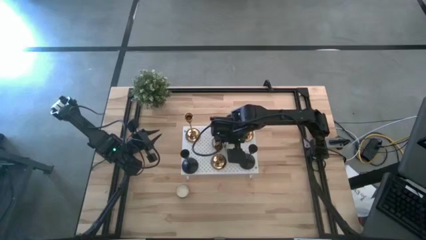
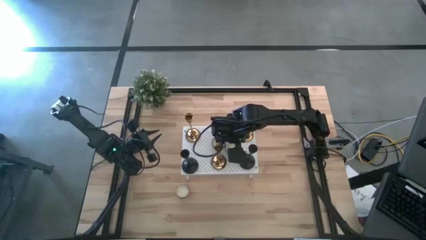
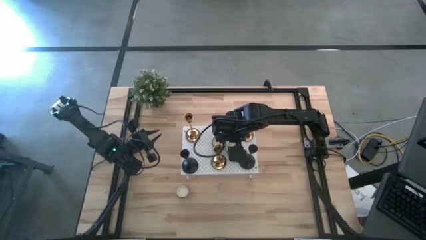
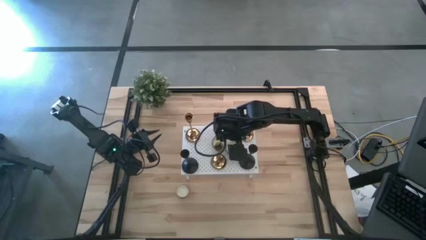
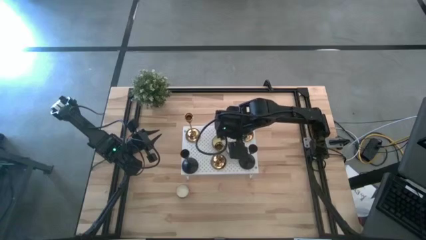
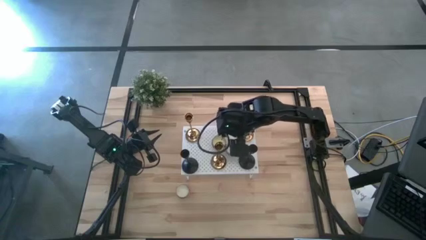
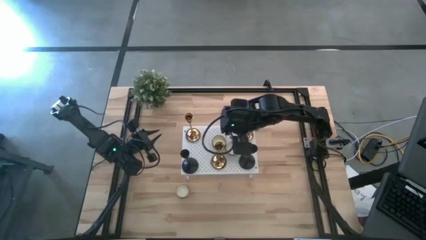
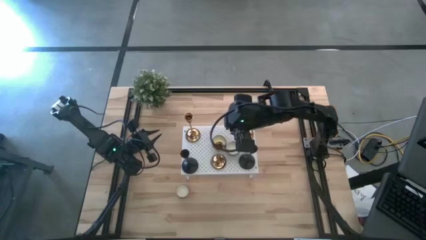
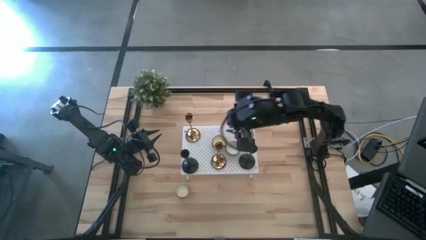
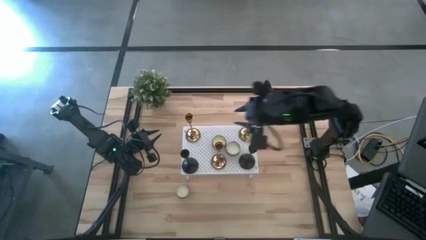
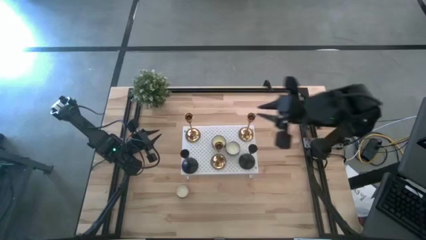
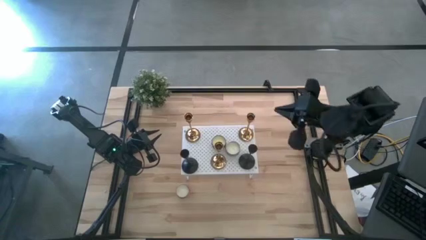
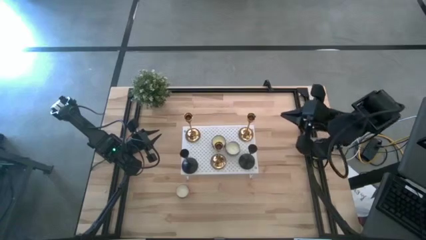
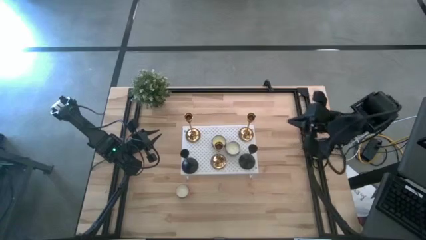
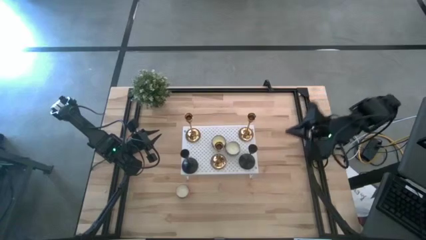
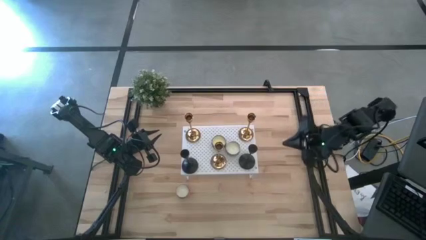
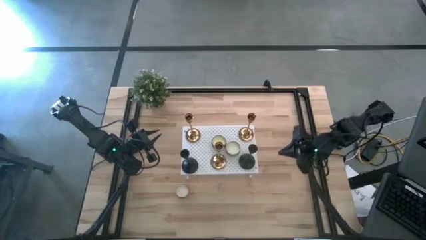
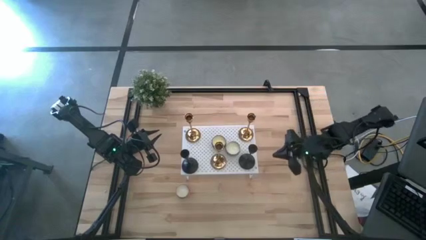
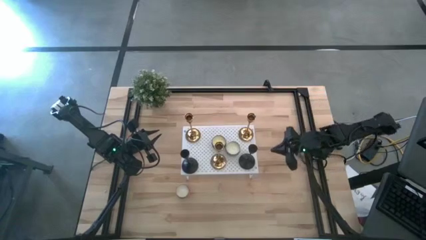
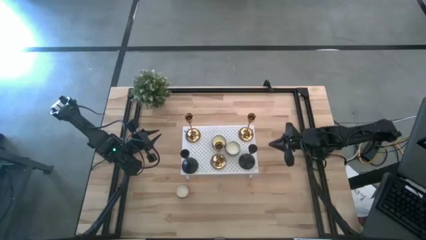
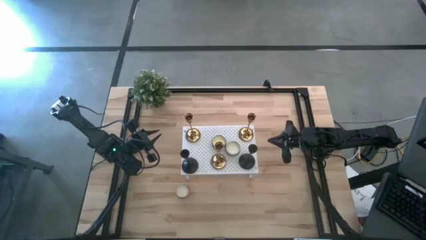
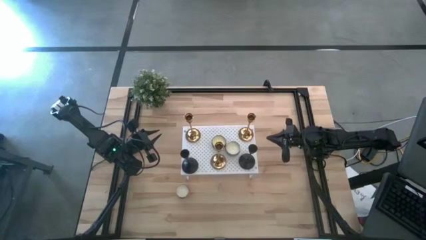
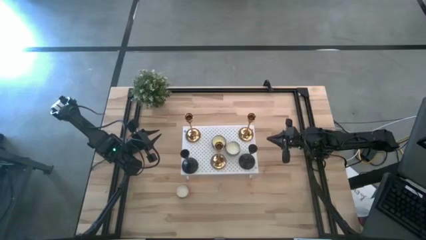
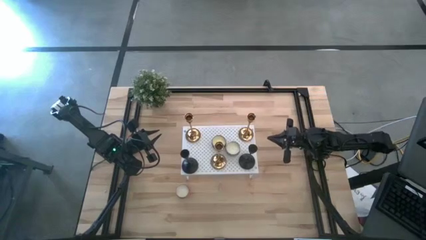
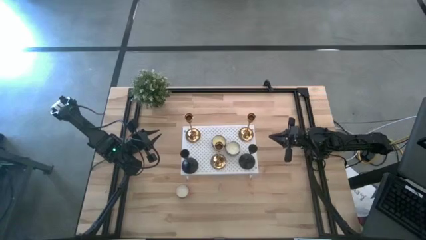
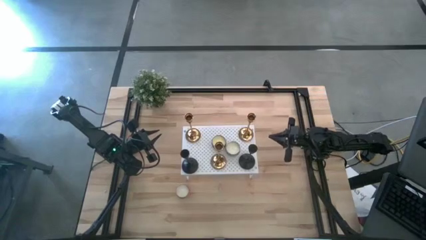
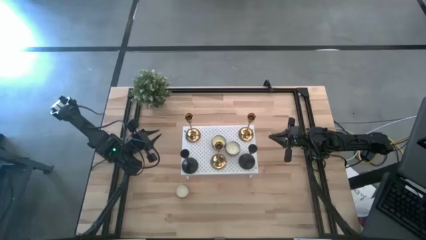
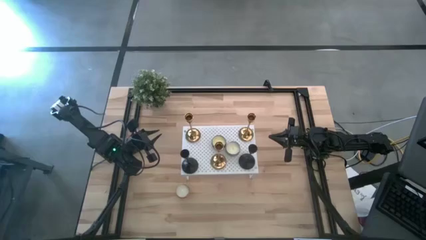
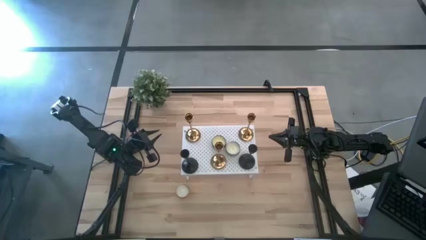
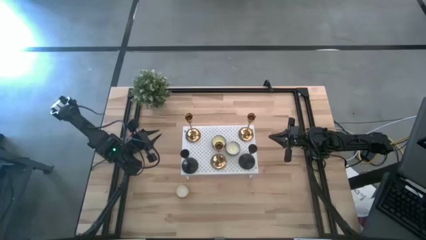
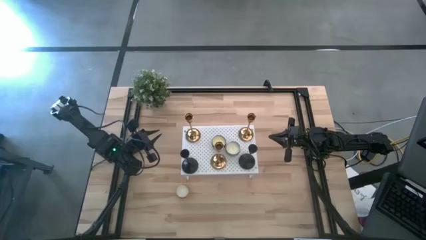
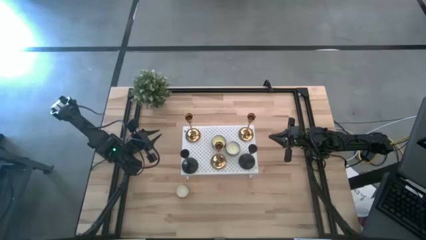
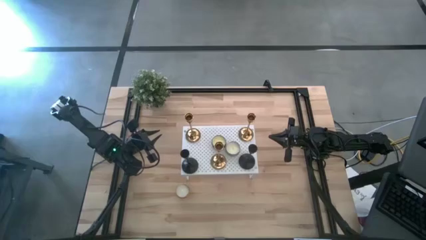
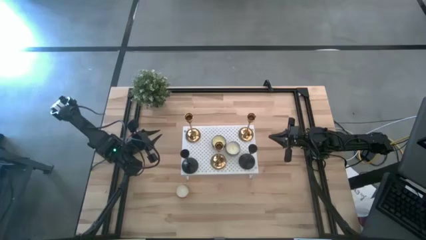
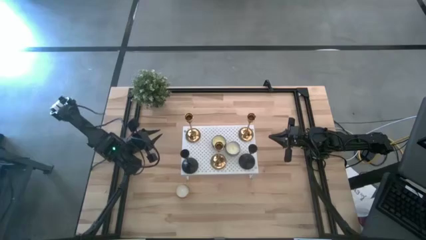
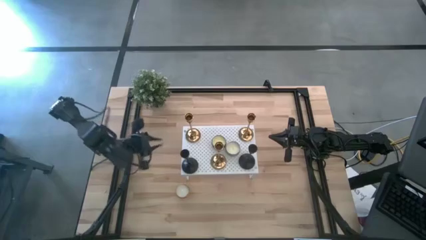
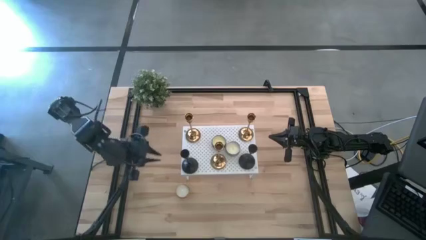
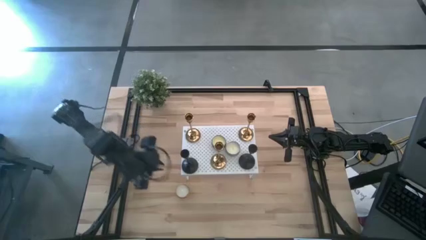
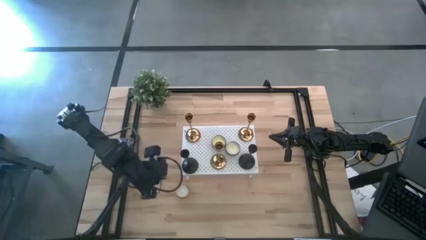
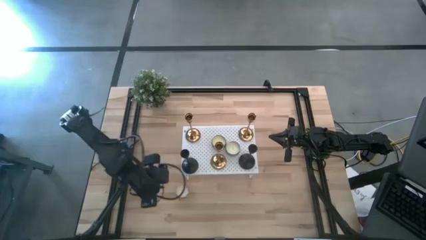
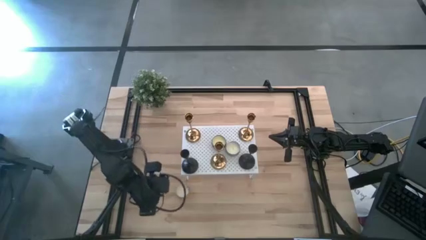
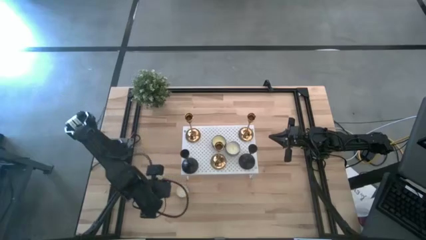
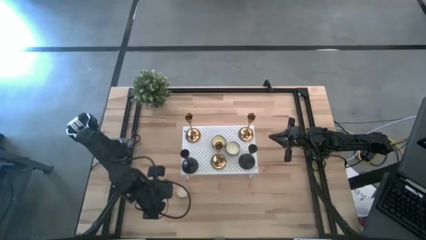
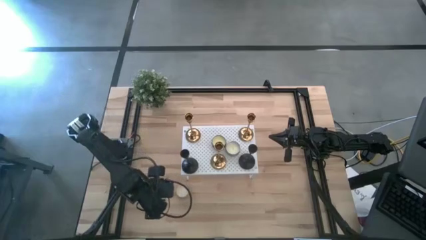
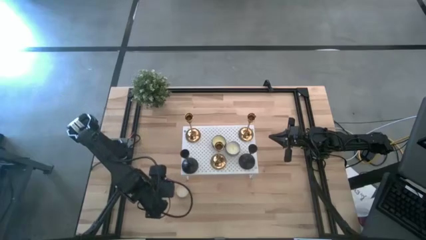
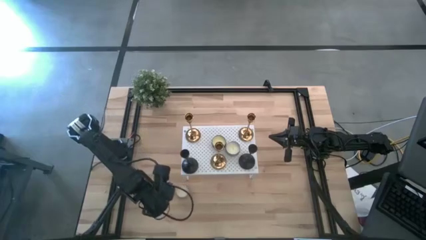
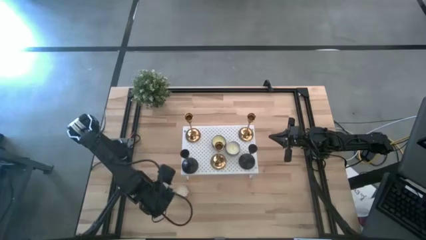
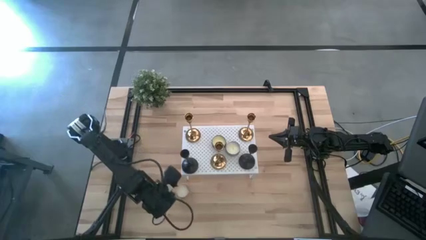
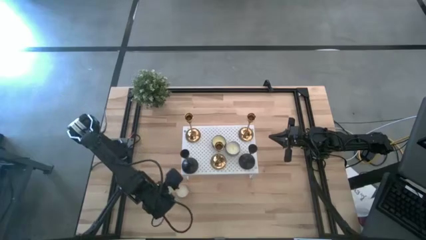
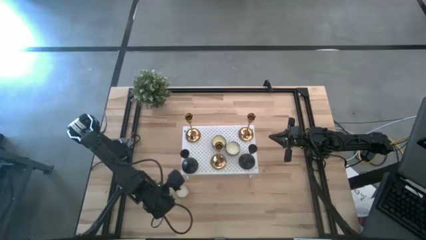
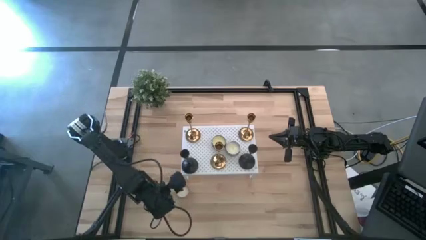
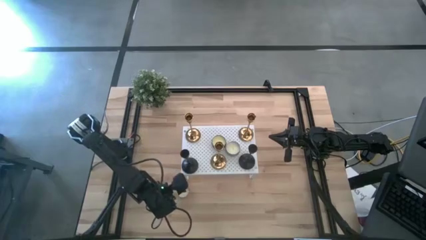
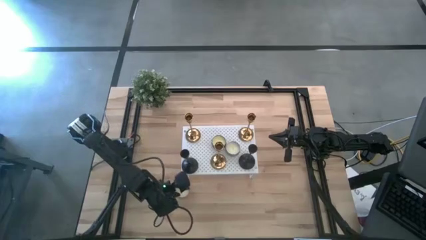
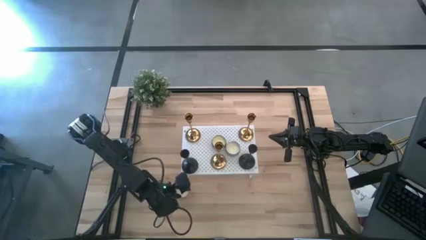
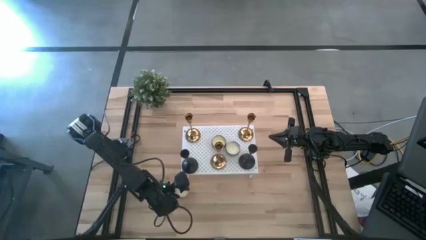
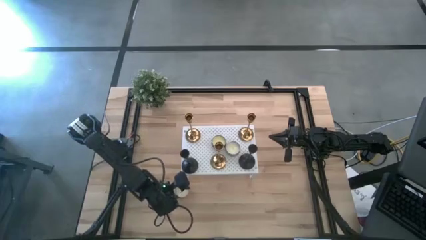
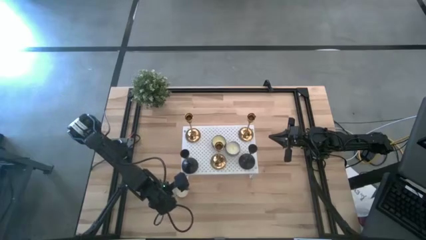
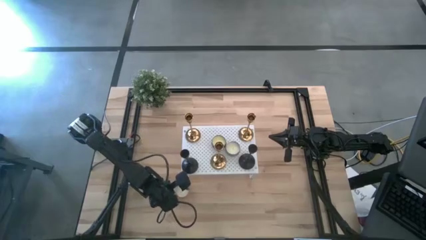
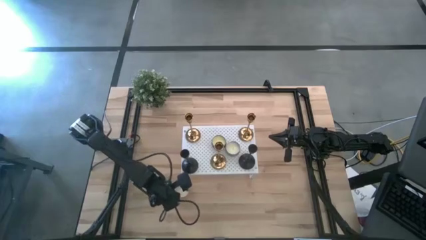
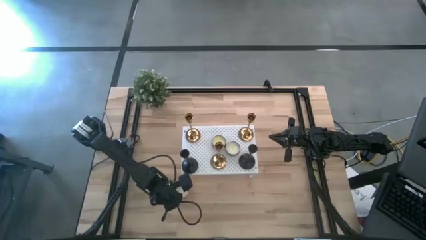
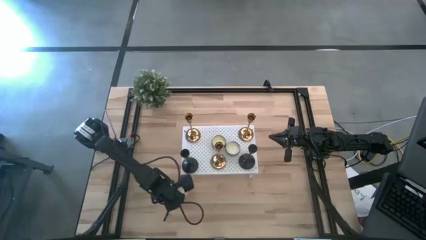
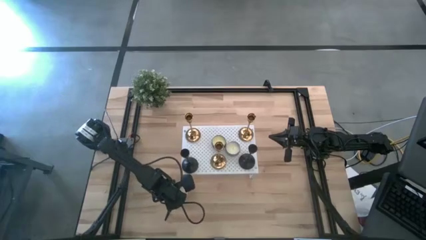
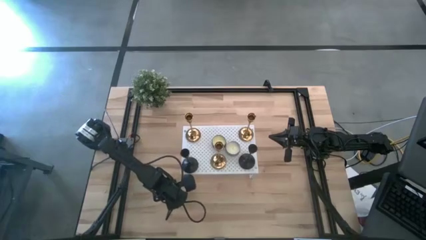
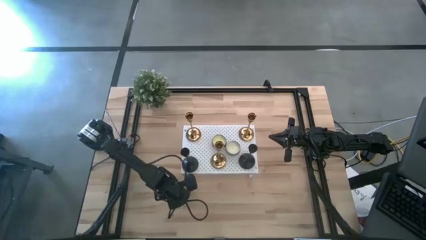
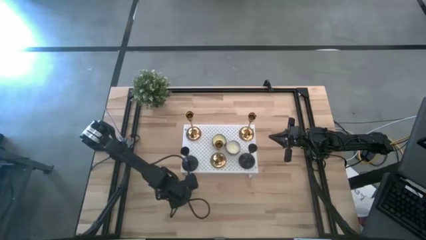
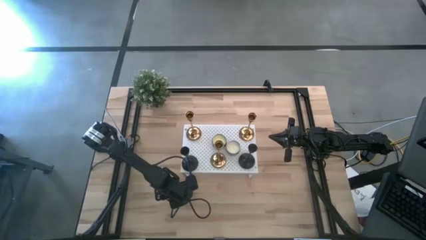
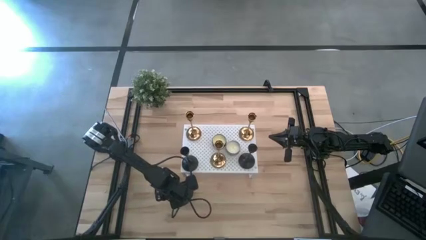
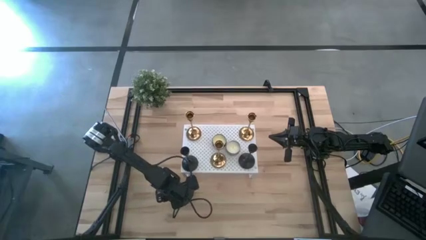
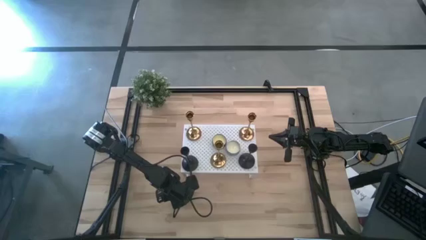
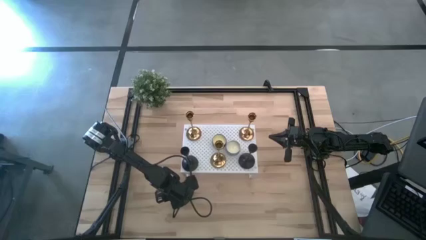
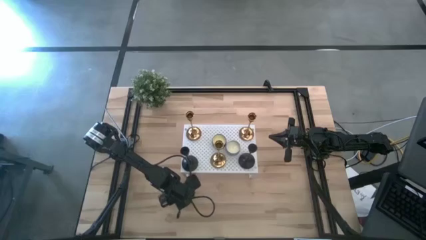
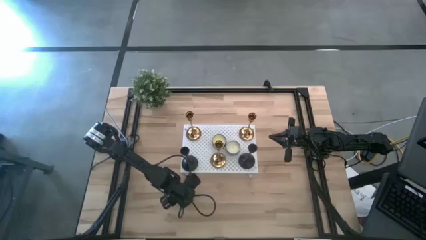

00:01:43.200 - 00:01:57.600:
Task: Pick & Place candle stick holders
Put the scented candle on the shelf

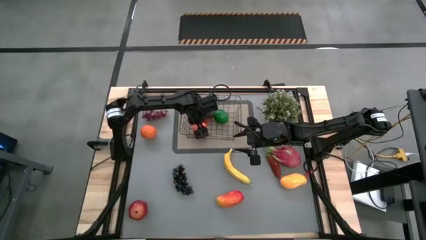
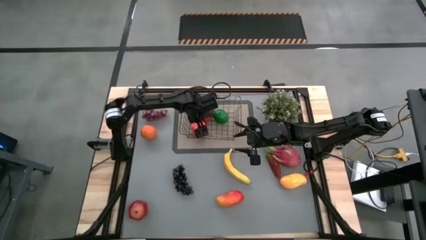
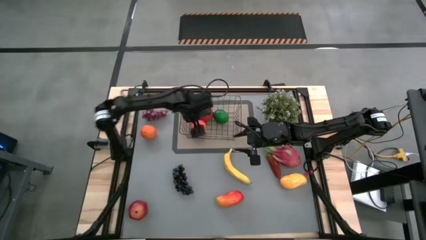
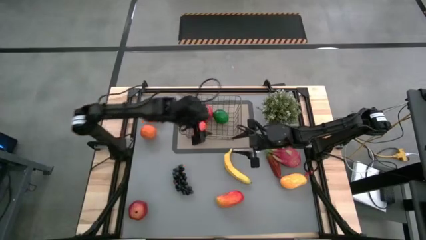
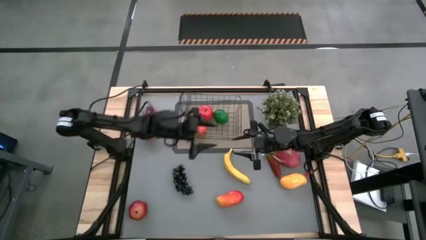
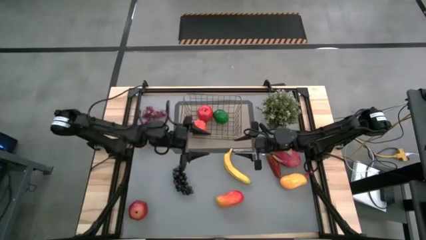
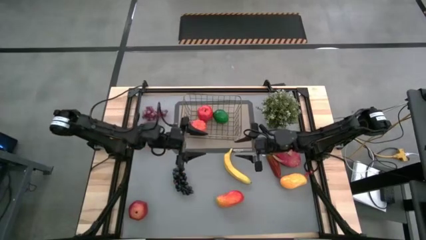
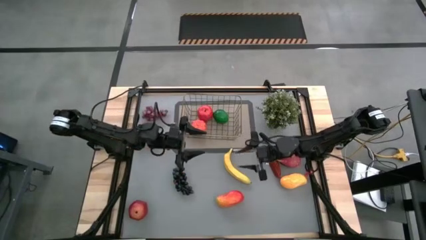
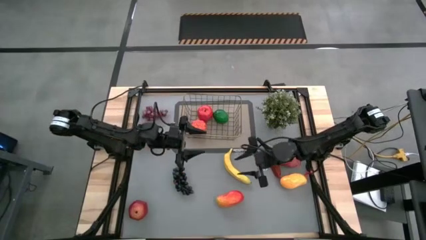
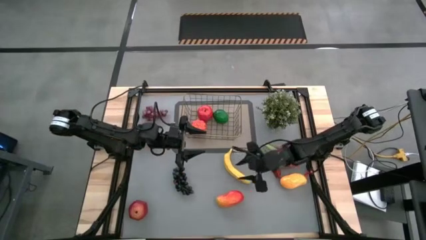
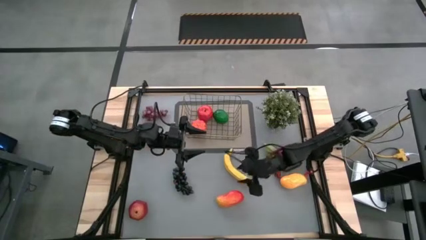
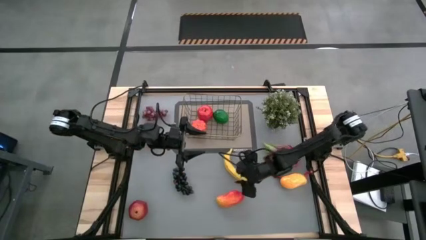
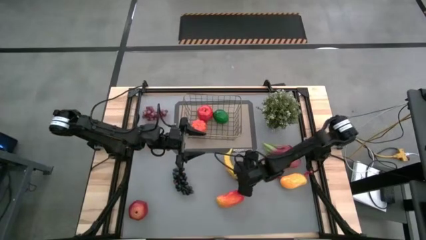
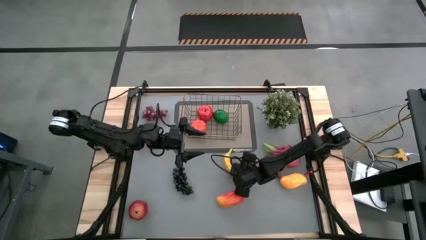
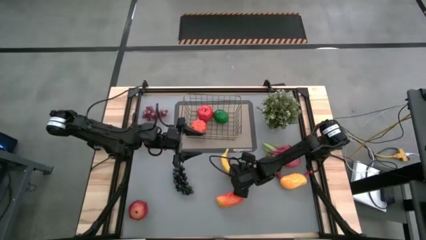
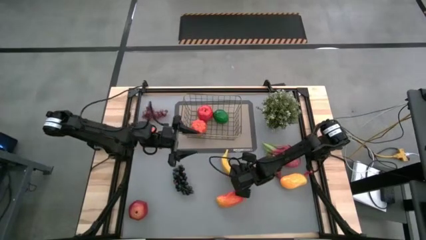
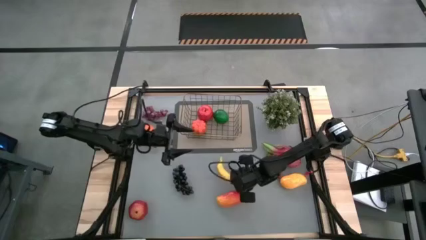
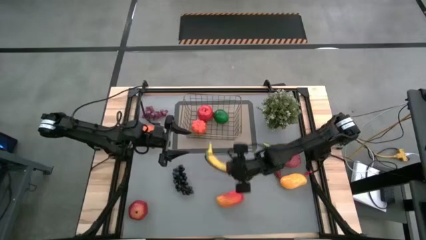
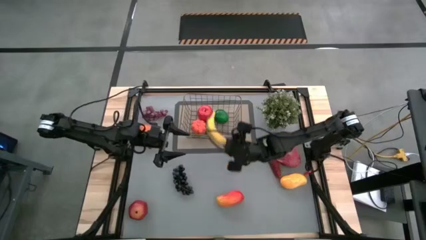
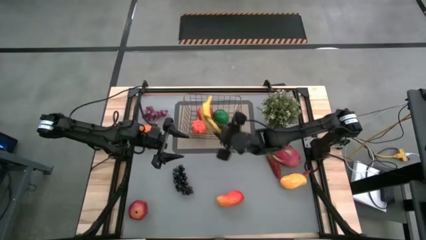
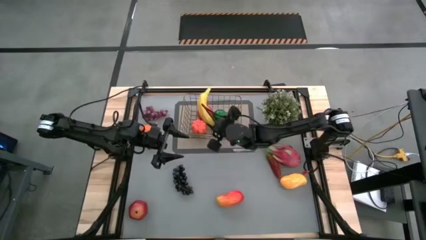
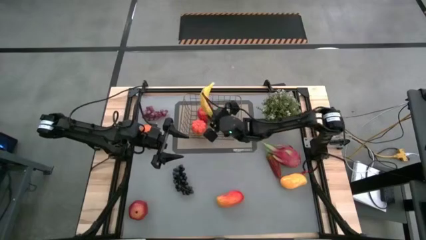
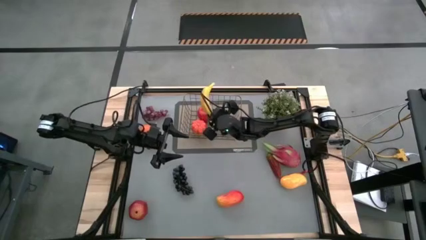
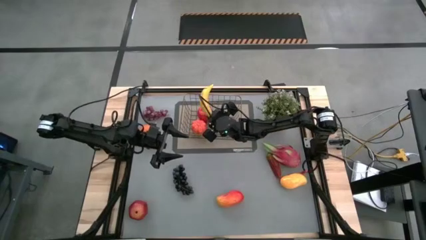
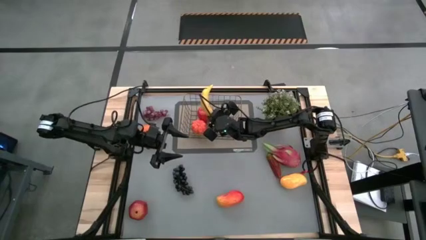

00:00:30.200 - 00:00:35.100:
Task: Build produce basket
Put the banana into the wire basket
